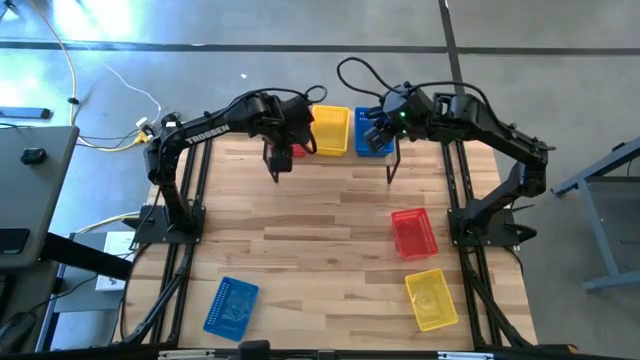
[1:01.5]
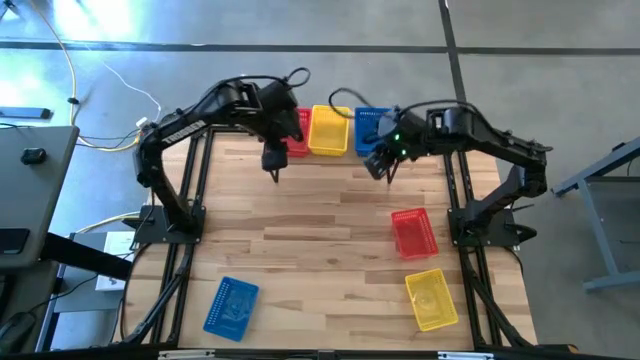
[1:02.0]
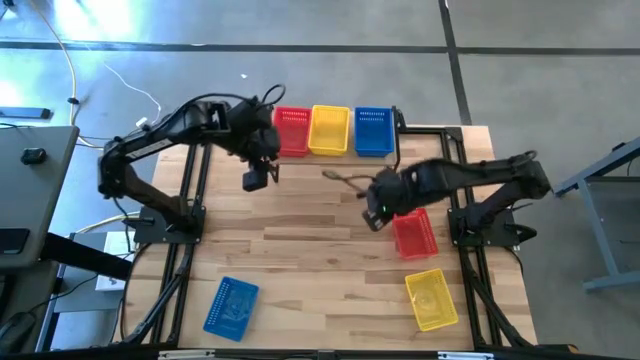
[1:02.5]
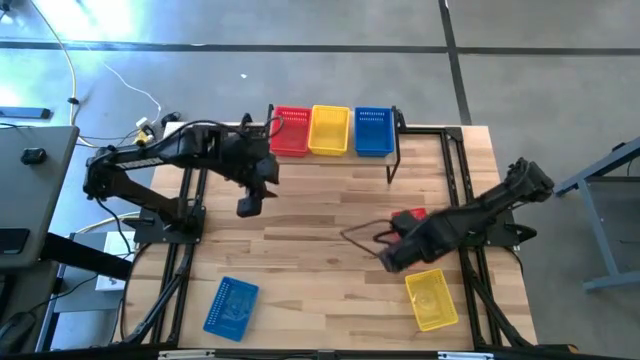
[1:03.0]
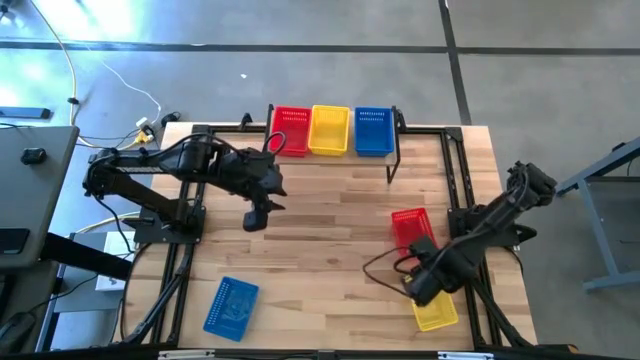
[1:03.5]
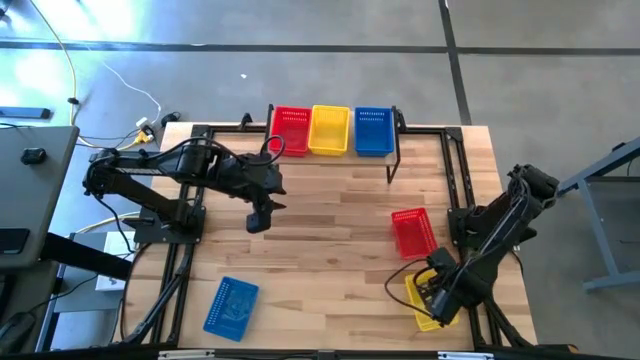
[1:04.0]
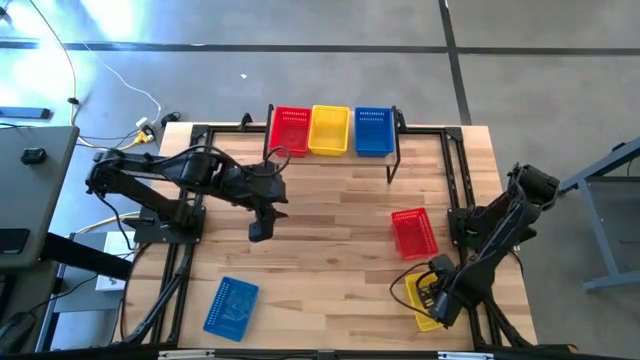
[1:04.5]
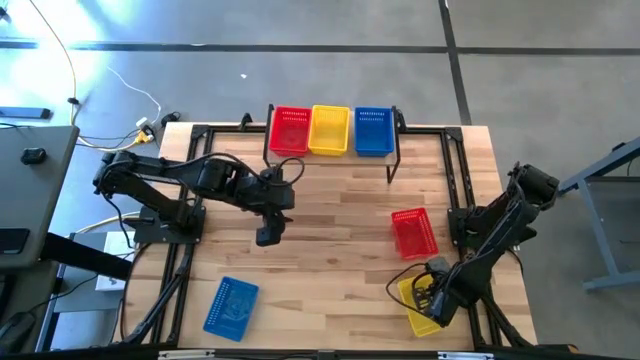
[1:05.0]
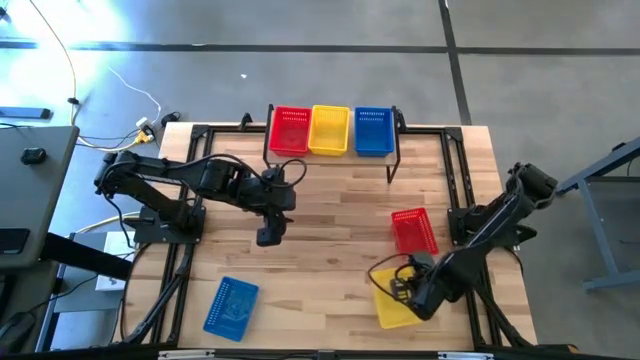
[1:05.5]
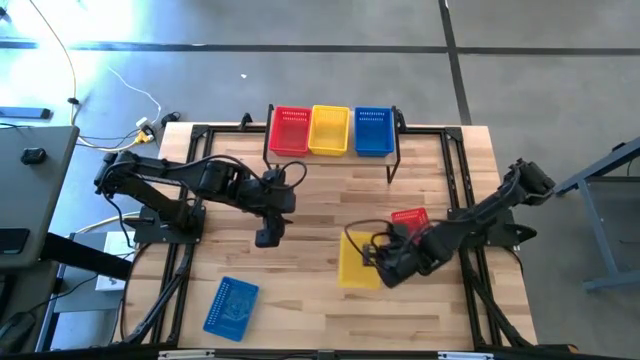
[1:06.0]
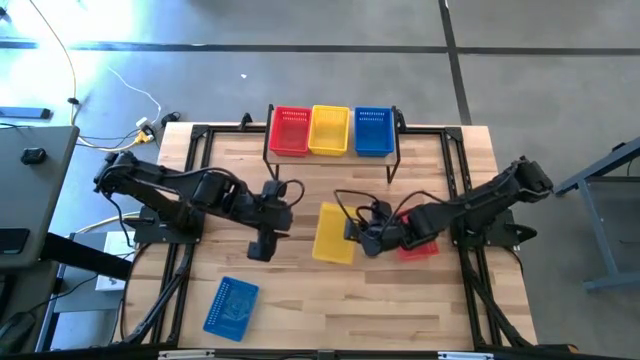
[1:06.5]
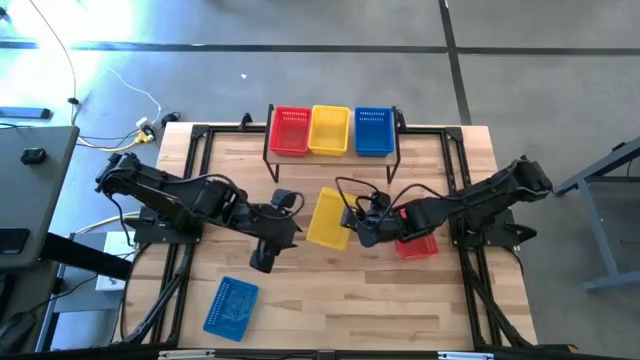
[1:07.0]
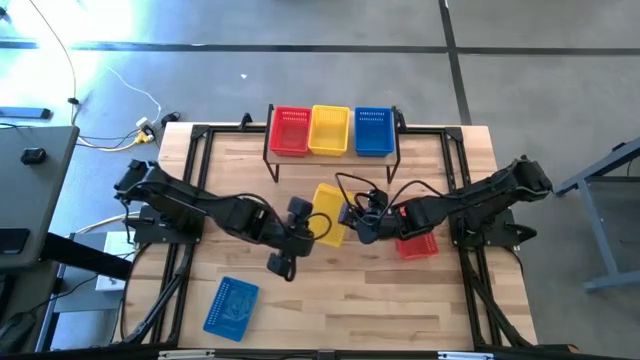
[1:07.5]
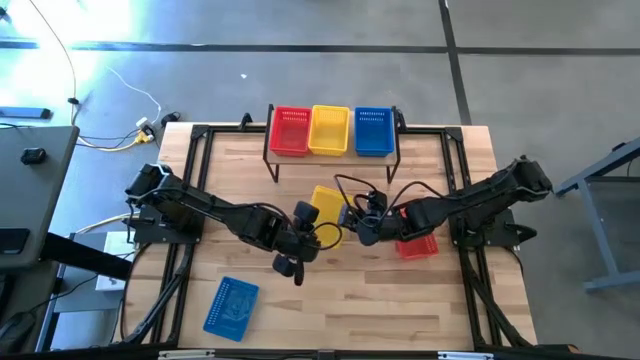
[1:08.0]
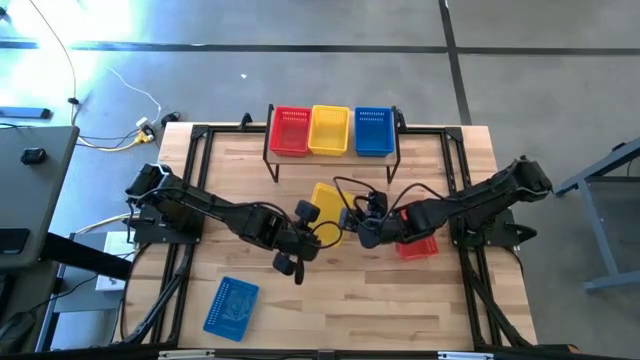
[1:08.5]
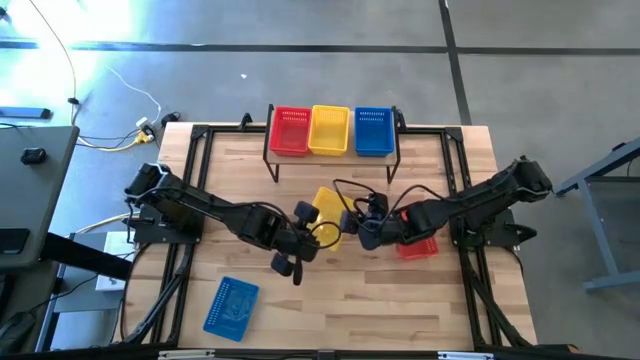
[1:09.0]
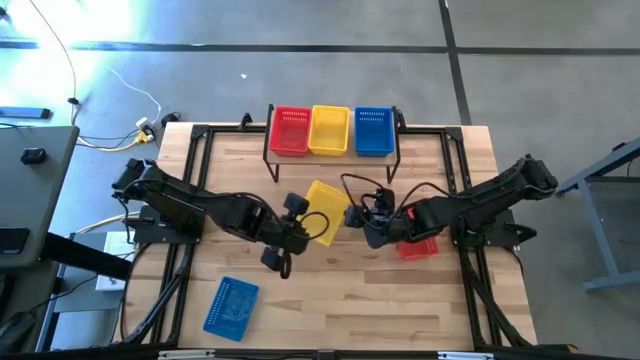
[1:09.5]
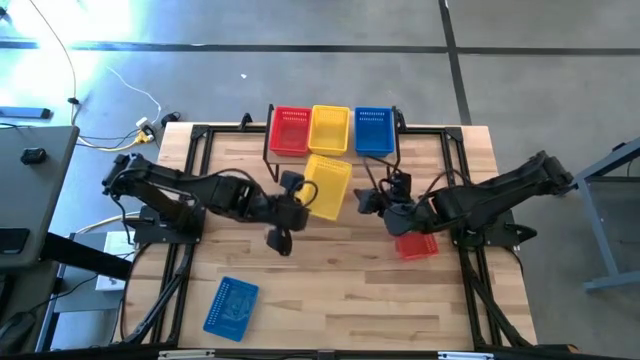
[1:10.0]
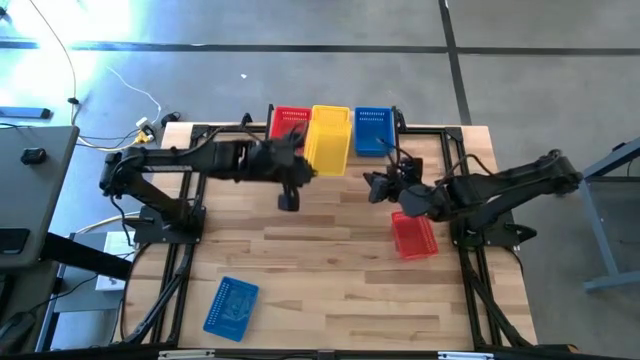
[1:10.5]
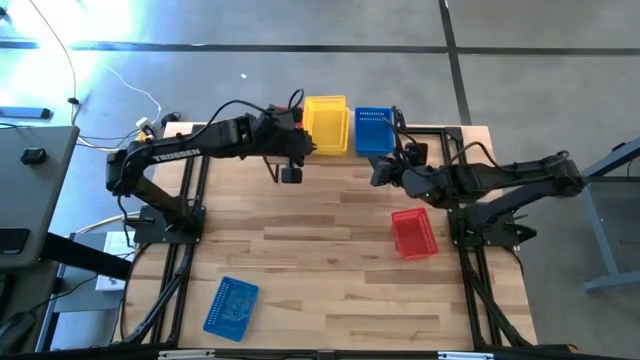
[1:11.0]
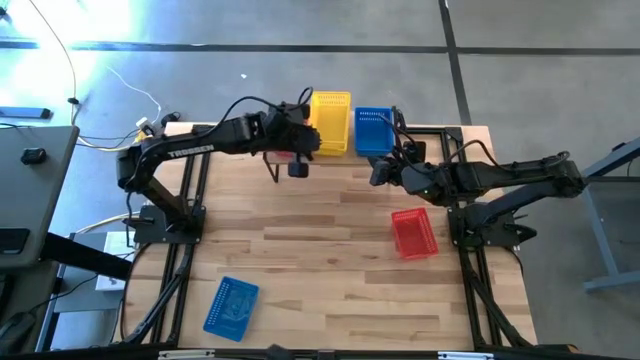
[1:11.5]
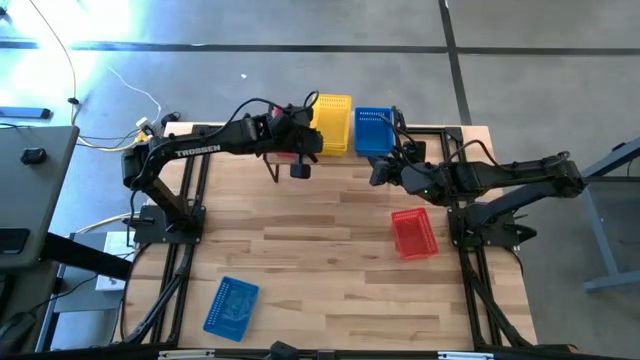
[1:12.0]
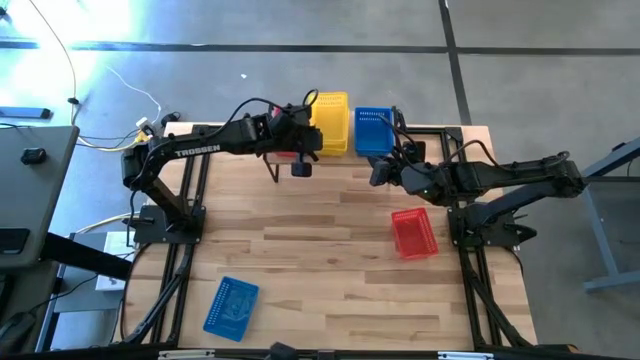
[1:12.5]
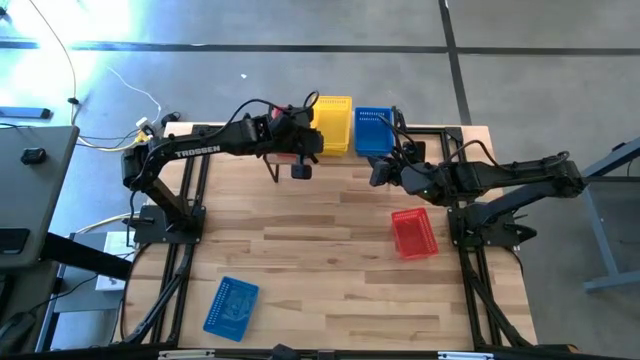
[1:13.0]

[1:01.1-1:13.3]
Task: Stack baskets on shelf by color
Stack the yellow bin on the stacked yellow bins on the shelf

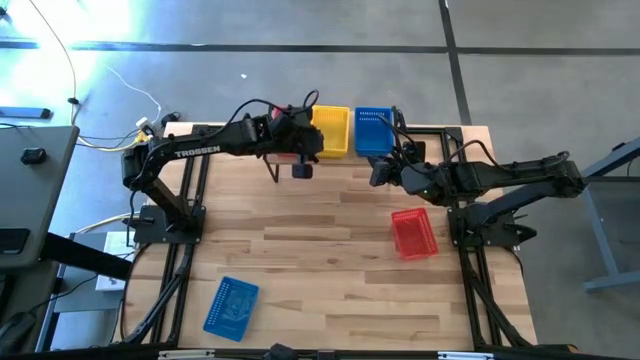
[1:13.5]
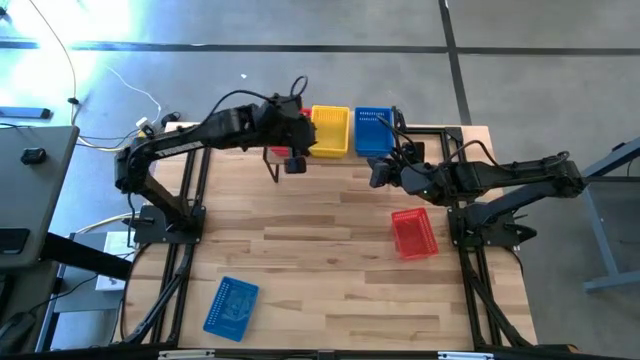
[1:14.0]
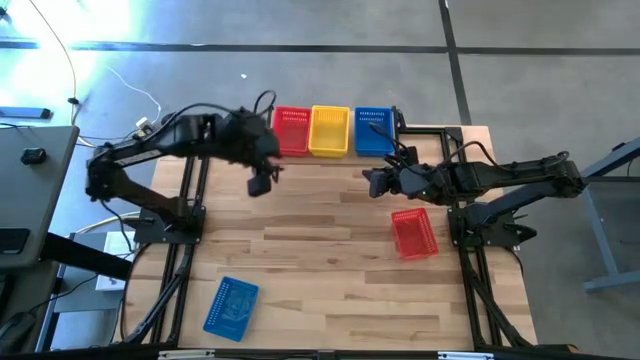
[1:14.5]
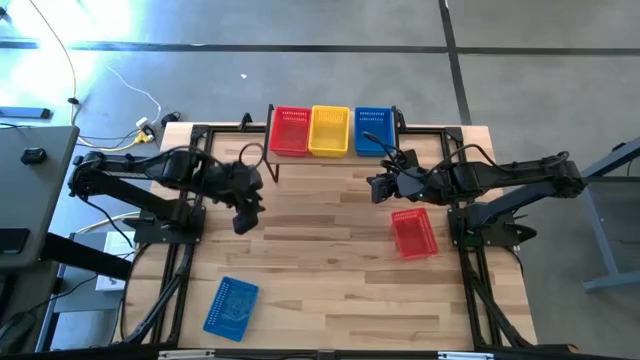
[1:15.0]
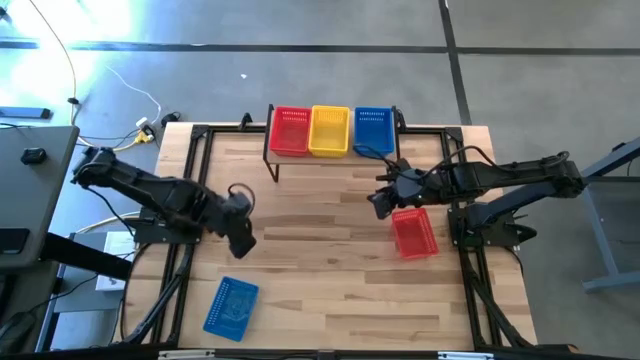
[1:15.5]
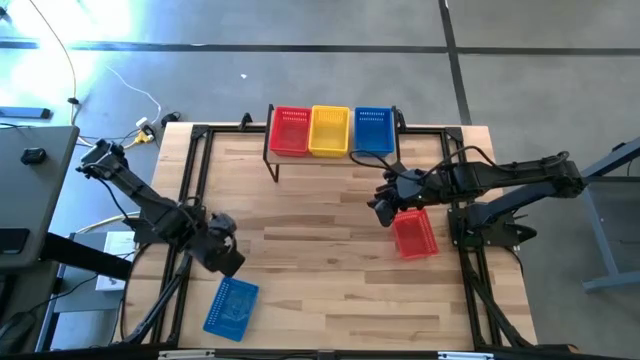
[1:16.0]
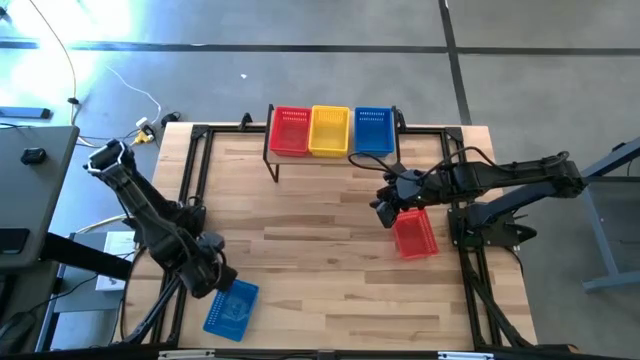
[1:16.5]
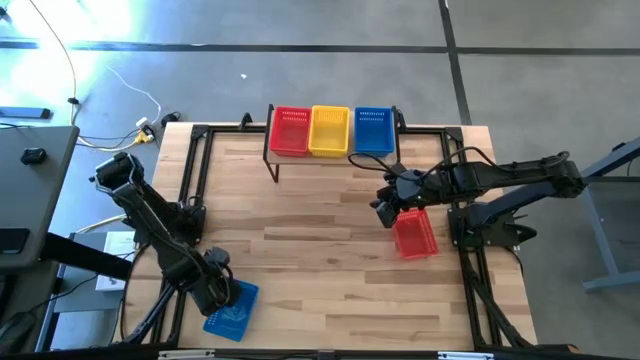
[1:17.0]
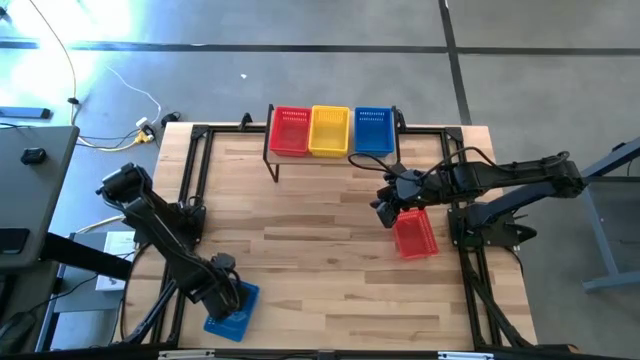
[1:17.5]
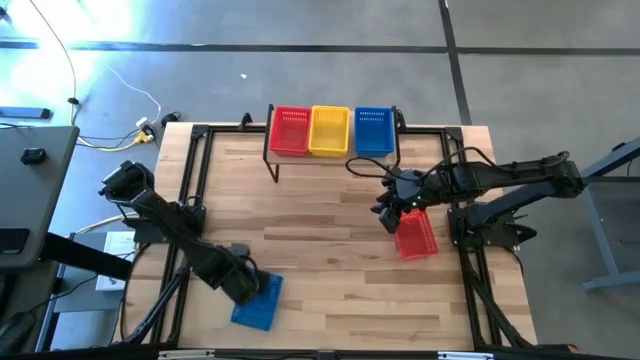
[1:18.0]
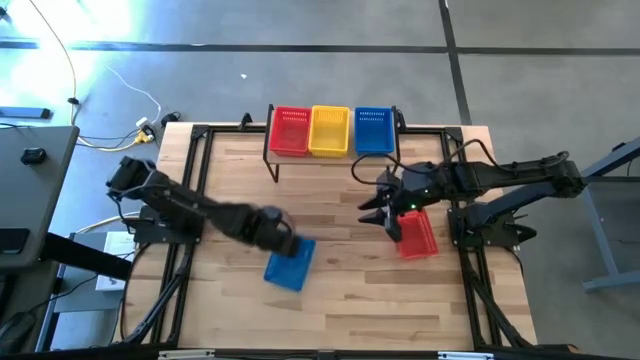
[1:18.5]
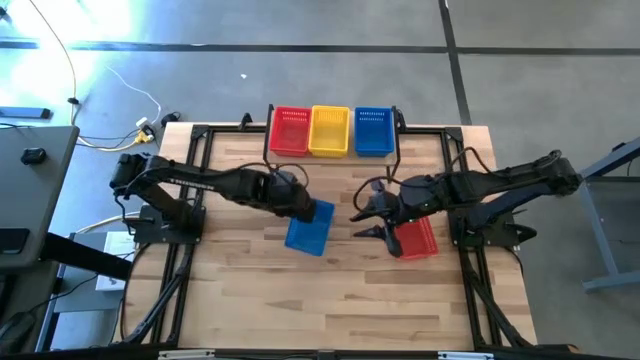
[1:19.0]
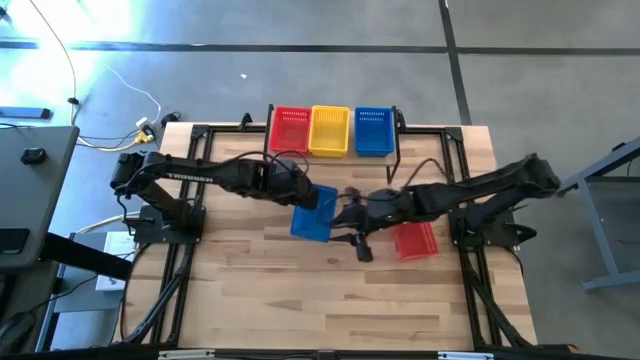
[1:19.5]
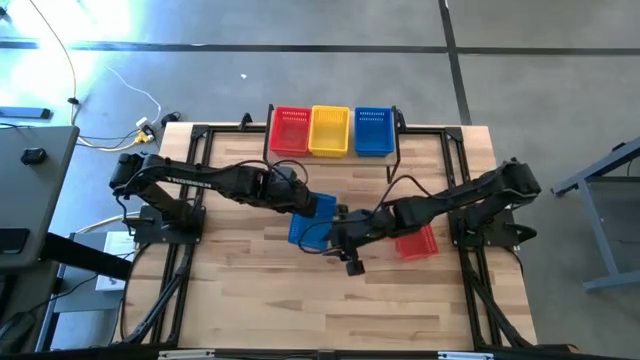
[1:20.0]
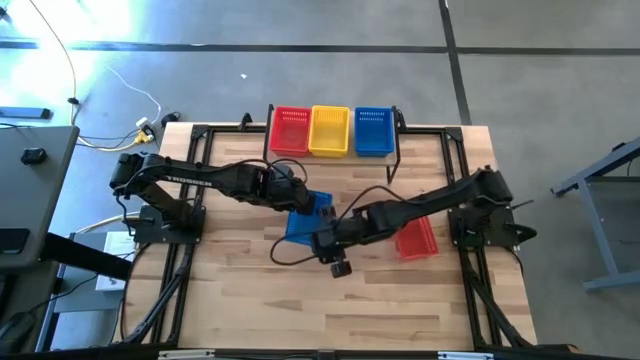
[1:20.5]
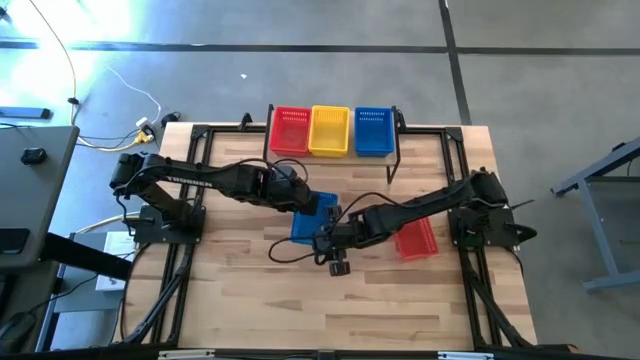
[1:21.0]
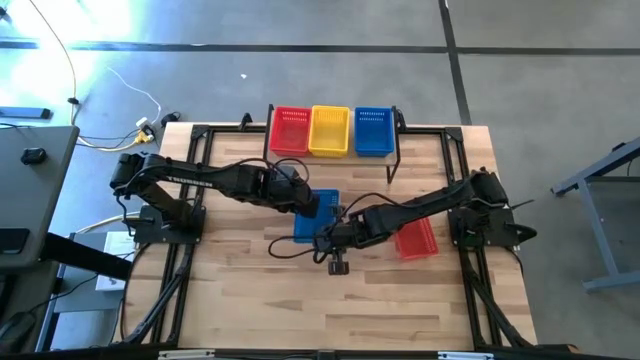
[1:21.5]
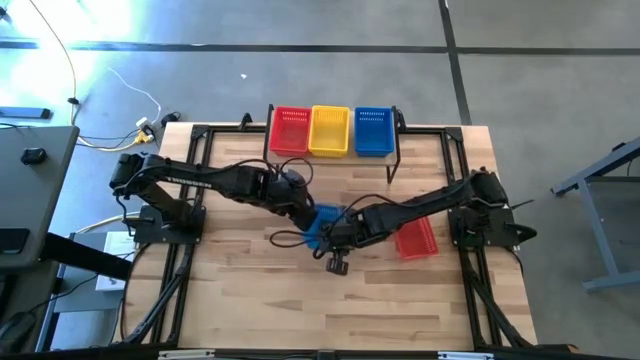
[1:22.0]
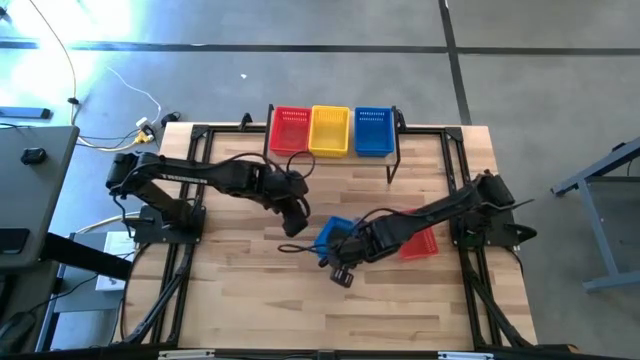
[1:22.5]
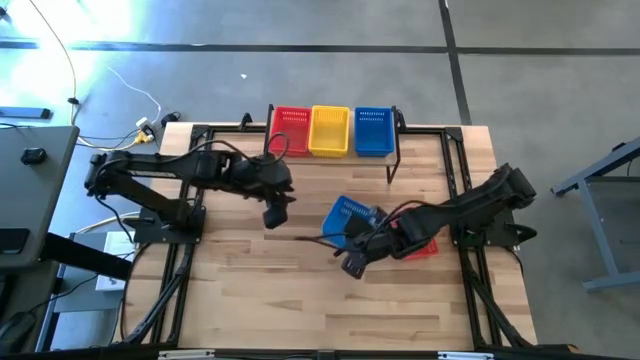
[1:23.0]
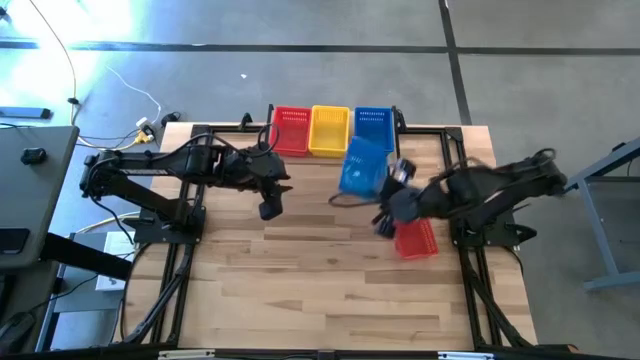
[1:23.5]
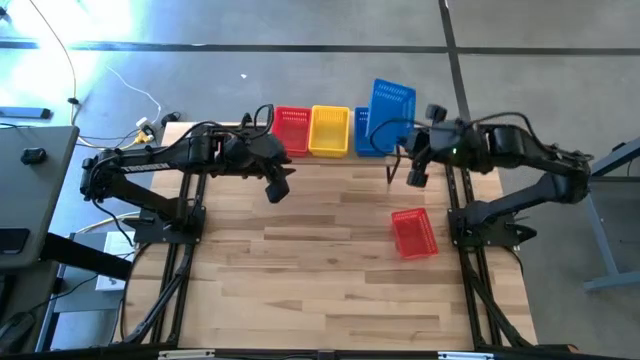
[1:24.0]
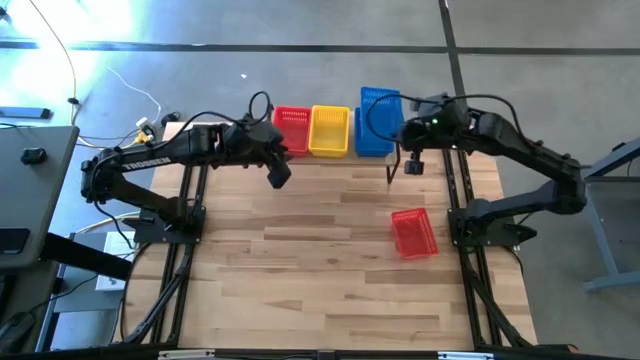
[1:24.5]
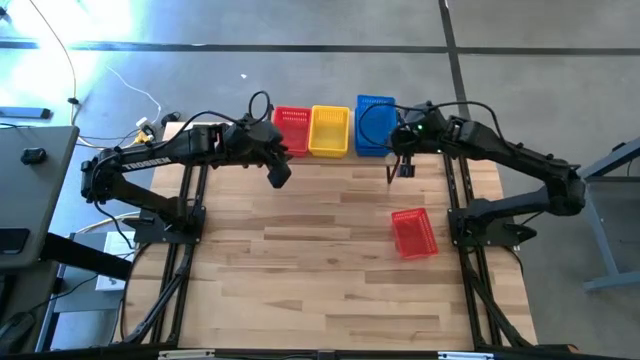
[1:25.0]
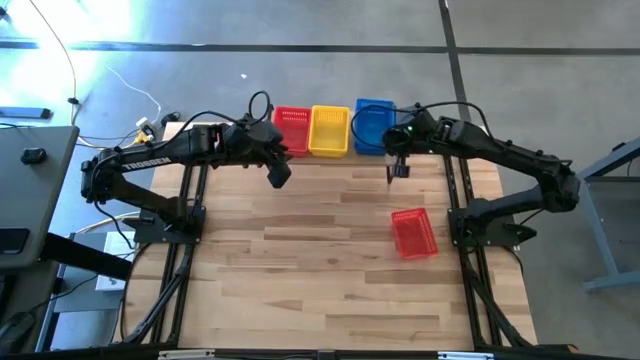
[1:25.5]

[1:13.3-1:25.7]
Stack the blue bin on the stacked blue bins on the shelf
